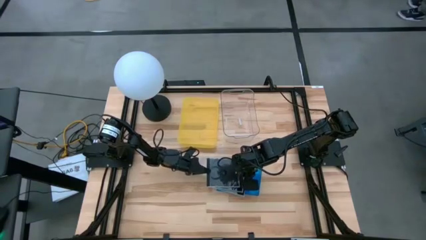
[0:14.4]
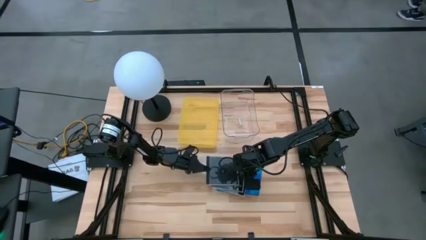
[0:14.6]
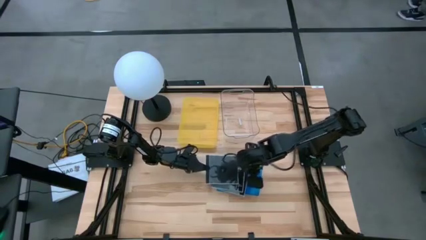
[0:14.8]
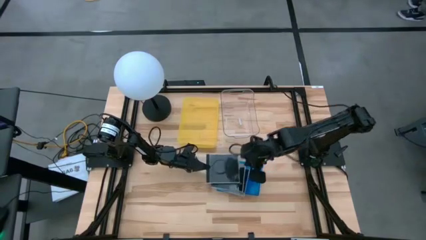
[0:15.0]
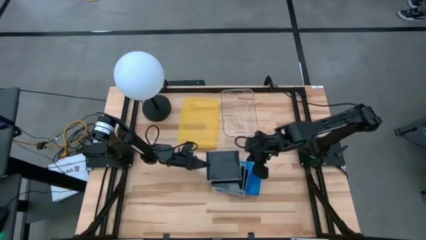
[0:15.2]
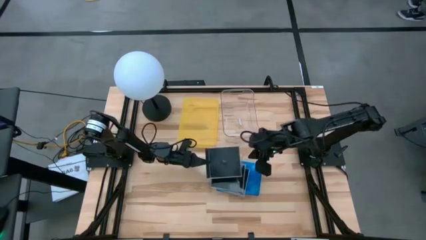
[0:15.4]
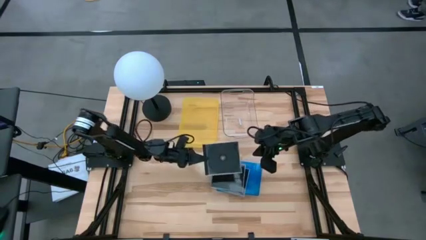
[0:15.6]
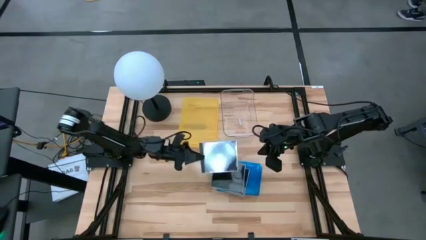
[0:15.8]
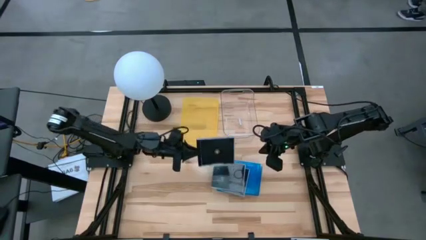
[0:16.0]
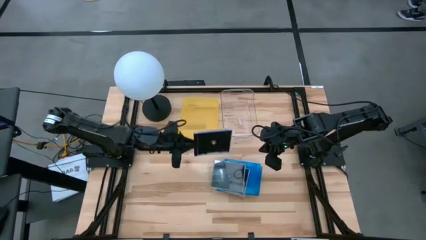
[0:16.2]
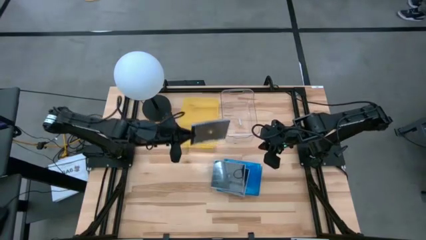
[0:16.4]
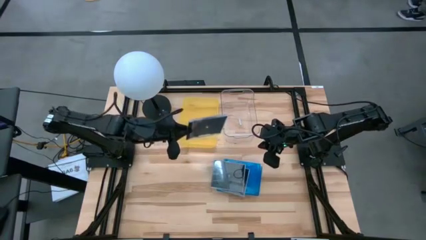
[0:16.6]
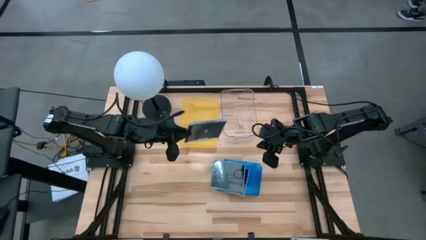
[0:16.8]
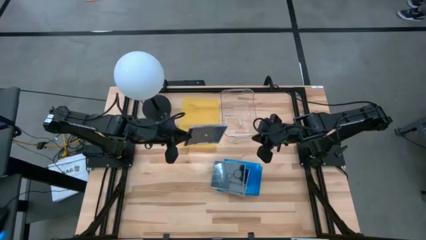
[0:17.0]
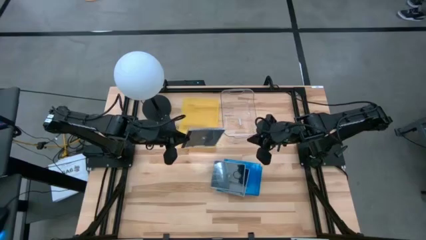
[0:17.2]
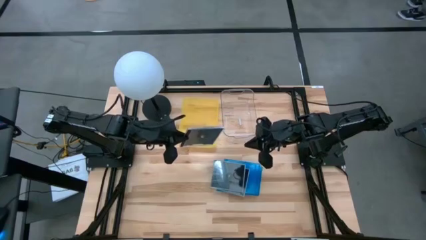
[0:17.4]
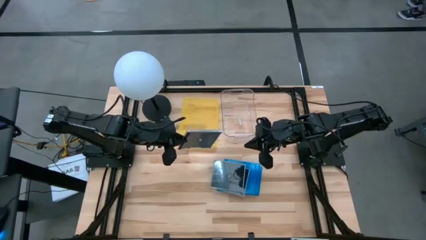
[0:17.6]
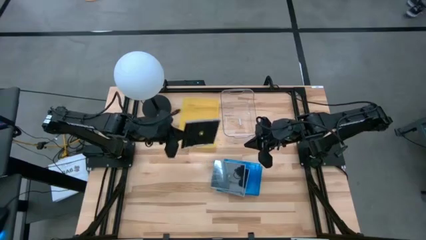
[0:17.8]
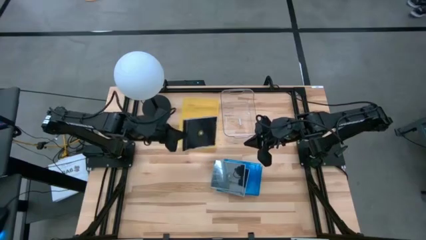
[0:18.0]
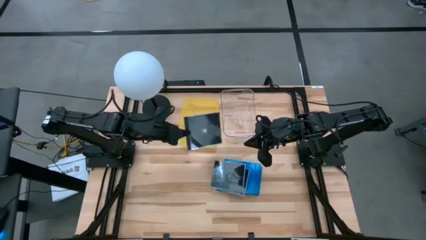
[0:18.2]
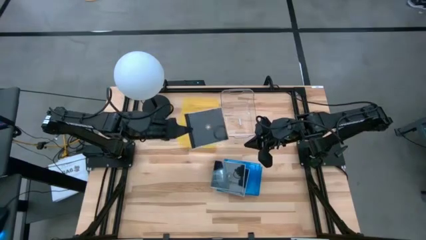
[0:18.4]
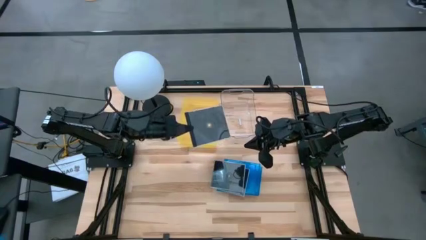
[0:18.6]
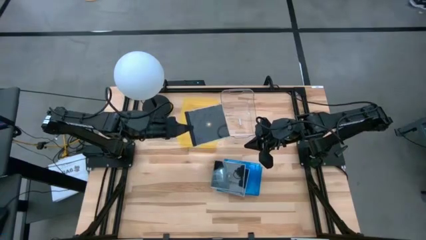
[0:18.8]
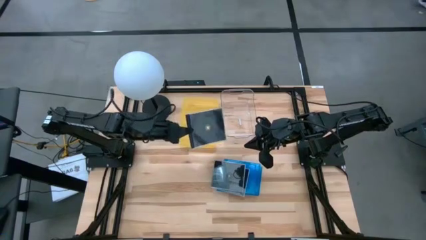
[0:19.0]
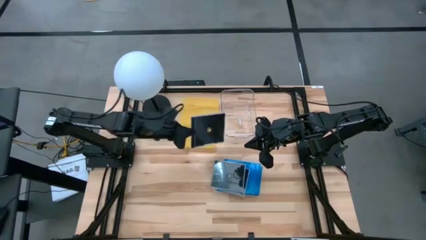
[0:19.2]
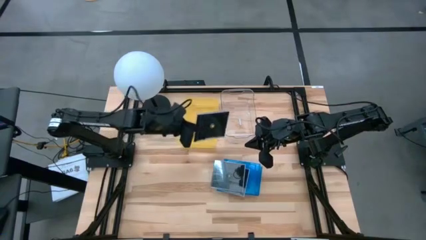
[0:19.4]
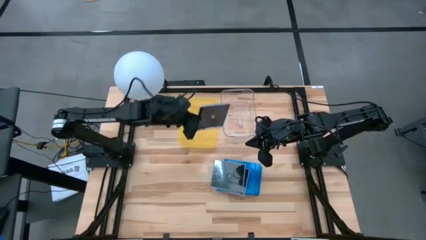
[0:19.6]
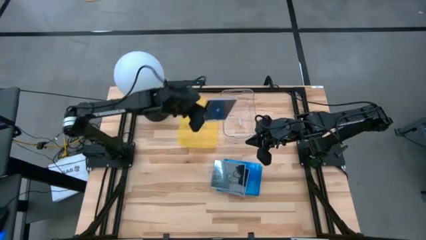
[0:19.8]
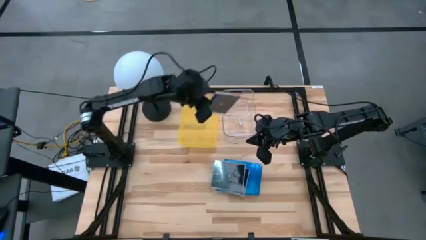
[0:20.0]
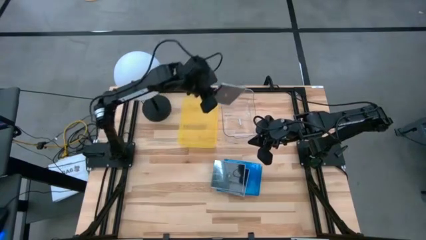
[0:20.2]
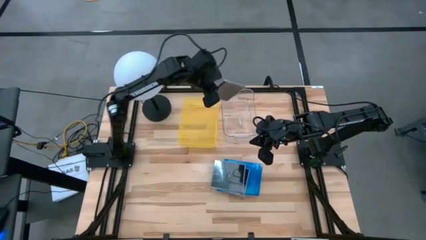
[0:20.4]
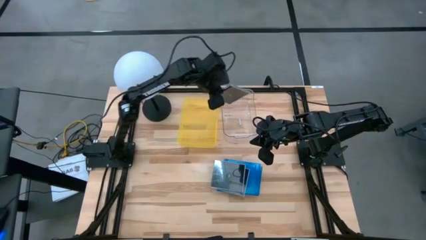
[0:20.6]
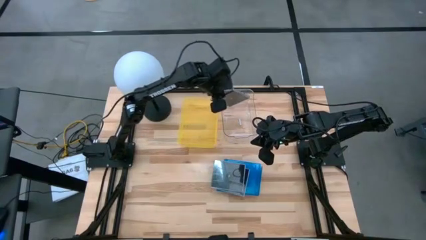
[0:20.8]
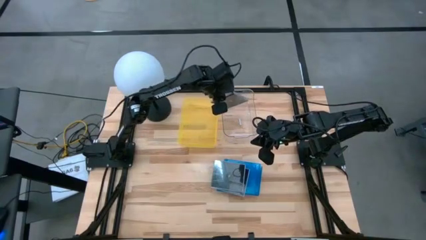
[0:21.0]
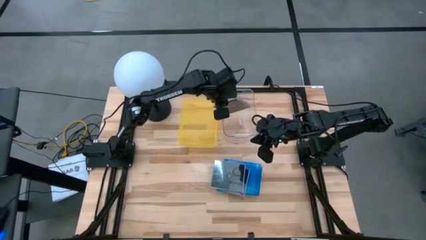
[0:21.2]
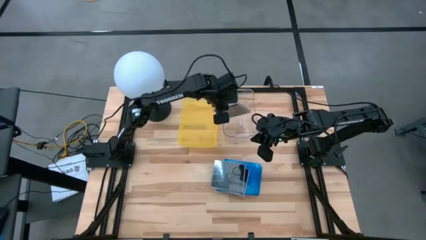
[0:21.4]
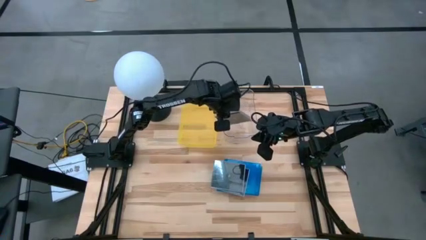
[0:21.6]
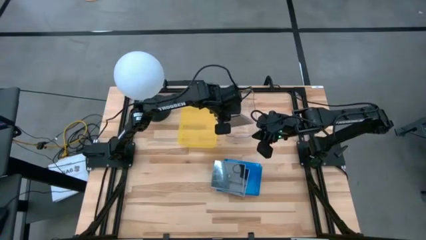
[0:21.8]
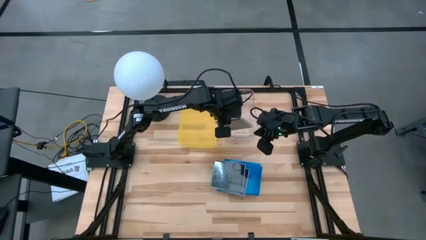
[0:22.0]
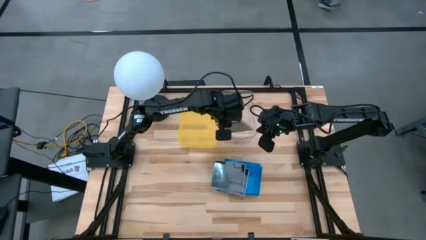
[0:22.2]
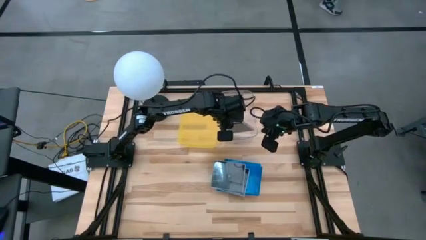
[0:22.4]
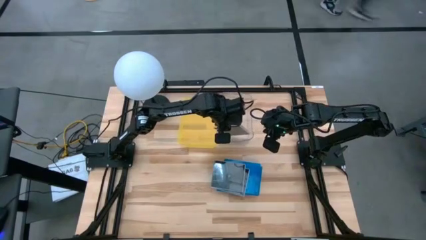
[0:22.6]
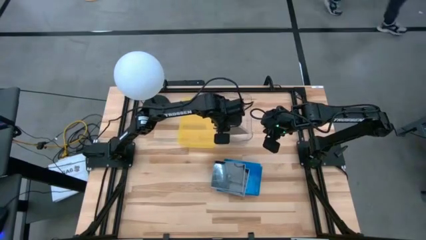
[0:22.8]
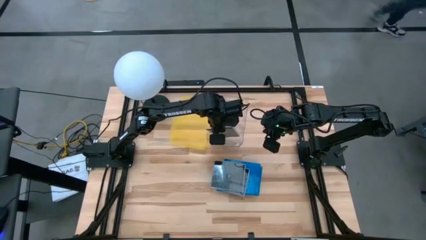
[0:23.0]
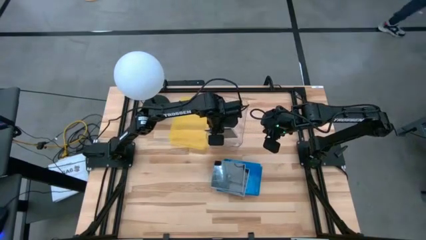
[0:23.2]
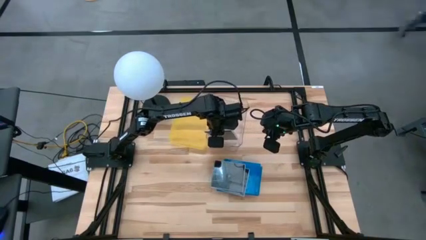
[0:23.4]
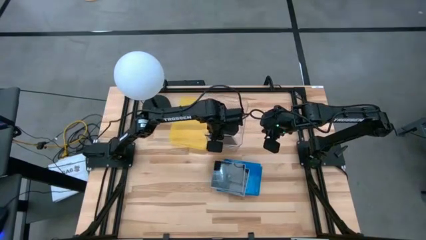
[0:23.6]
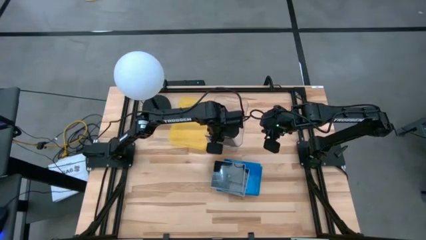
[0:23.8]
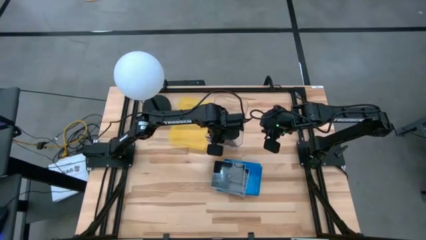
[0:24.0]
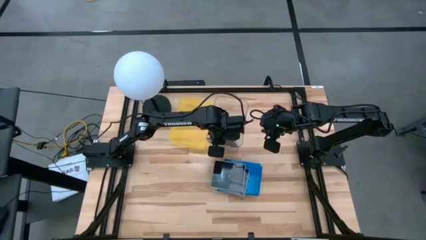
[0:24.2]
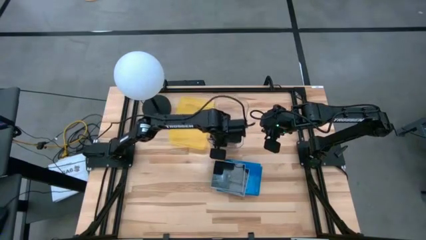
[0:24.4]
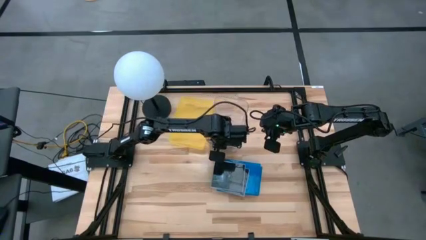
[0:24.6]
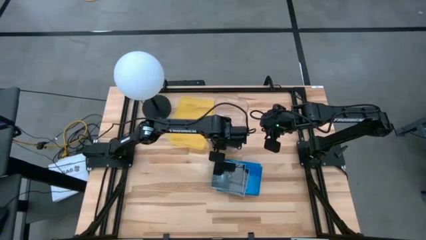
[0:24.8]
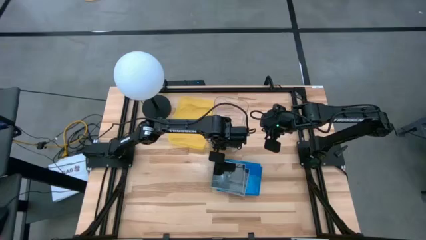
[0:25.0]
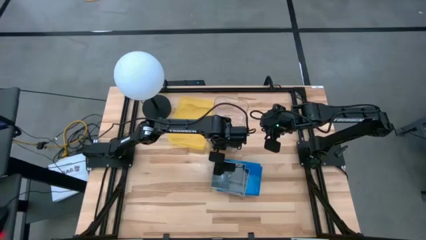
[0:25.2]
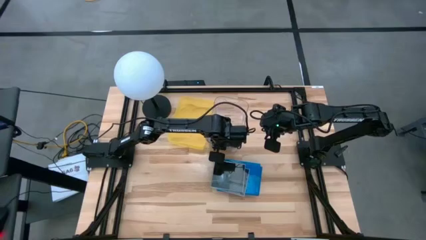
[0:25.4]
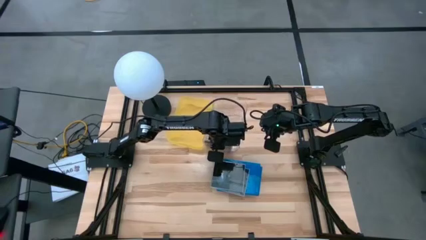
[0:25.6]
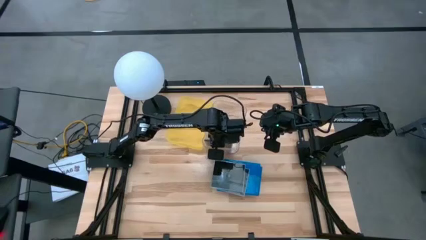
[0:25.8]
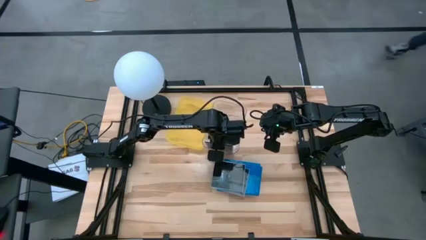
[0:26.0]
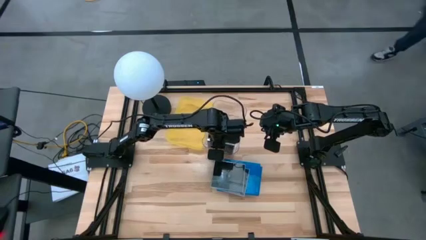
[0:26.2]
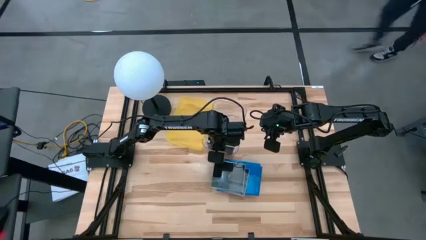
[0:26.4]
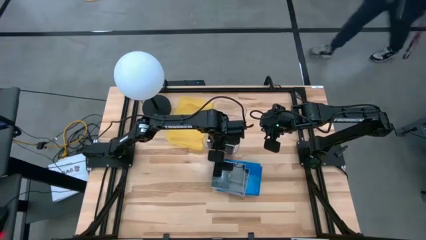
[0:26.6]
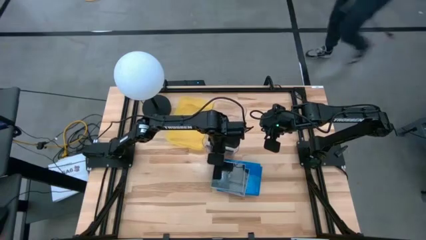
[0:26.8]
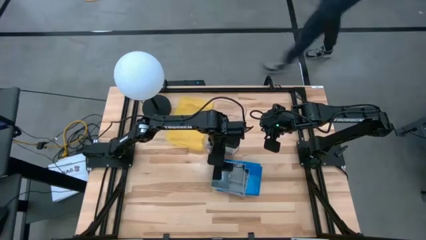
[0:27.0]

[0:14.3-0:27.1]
Task: Pick & place jewel cases by type
Put the black CD case into the transparent bin

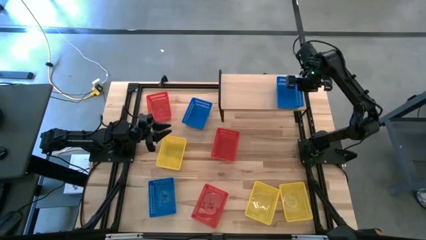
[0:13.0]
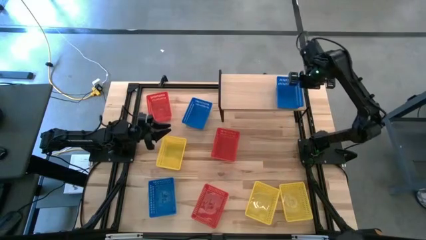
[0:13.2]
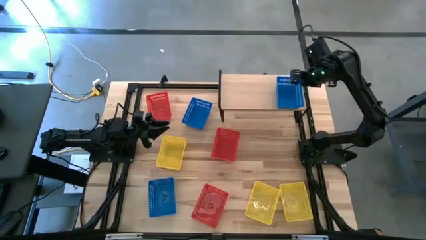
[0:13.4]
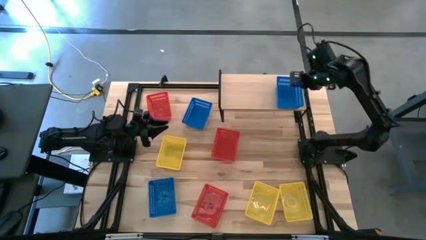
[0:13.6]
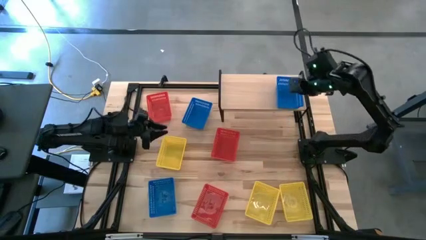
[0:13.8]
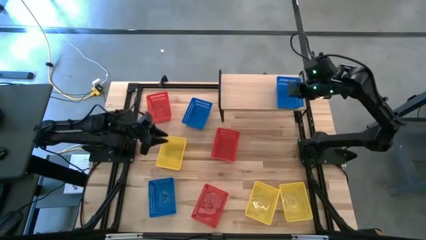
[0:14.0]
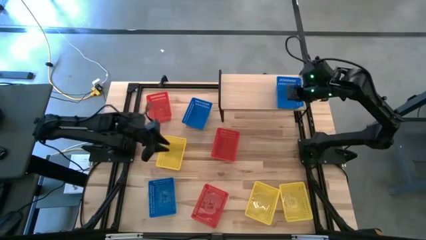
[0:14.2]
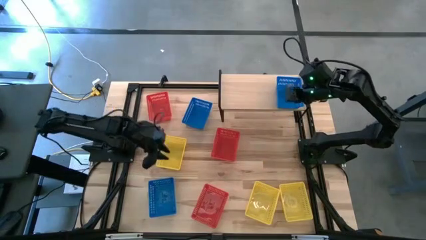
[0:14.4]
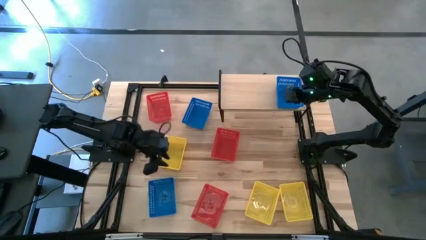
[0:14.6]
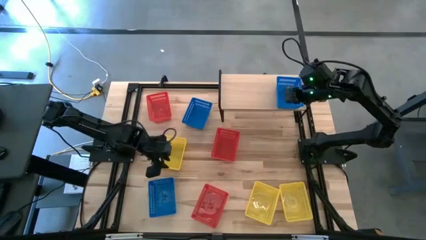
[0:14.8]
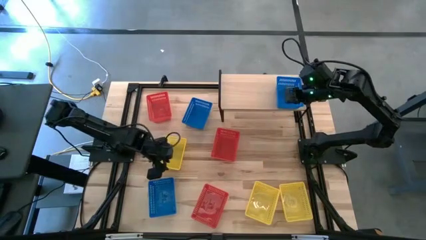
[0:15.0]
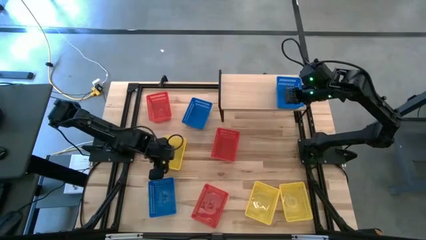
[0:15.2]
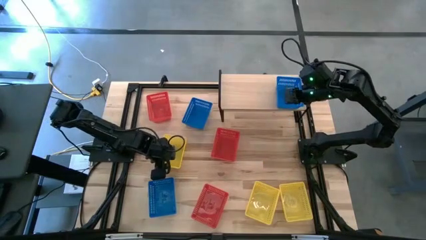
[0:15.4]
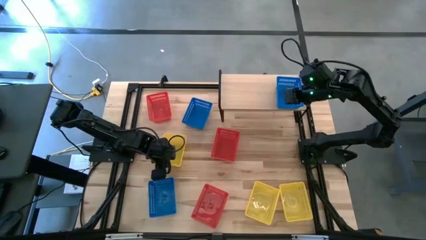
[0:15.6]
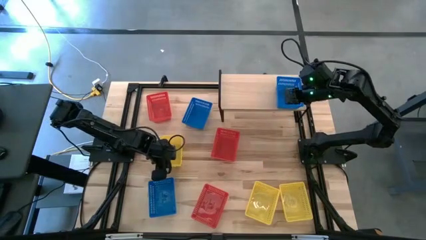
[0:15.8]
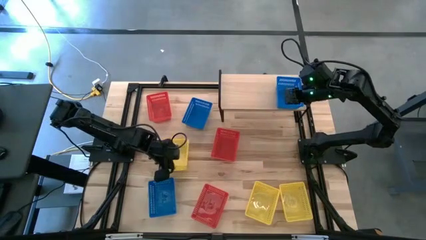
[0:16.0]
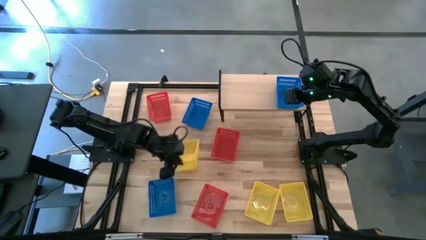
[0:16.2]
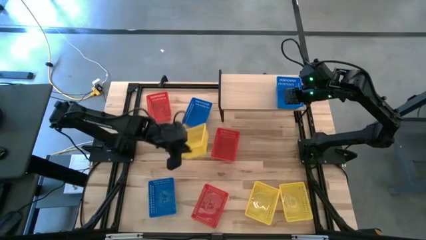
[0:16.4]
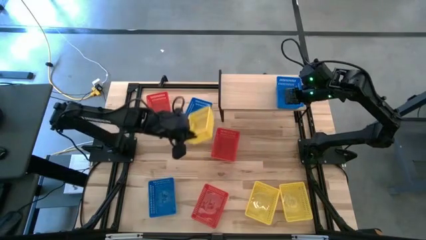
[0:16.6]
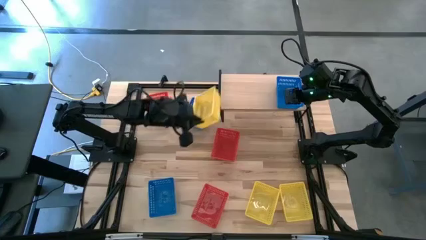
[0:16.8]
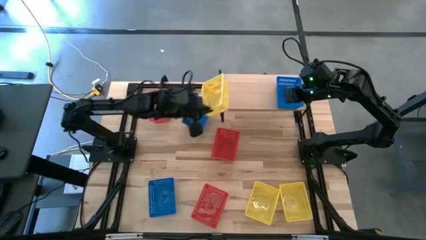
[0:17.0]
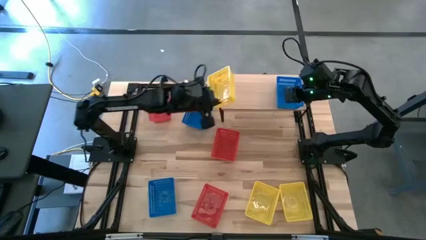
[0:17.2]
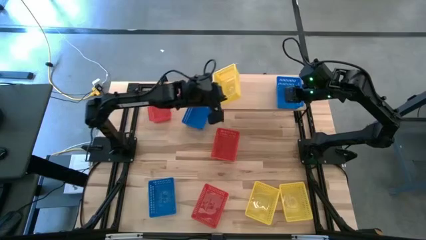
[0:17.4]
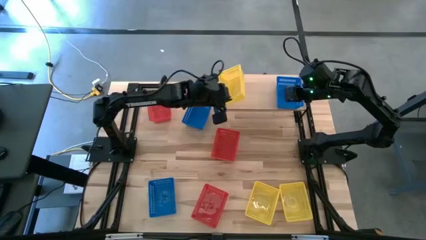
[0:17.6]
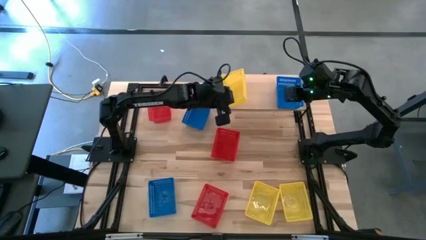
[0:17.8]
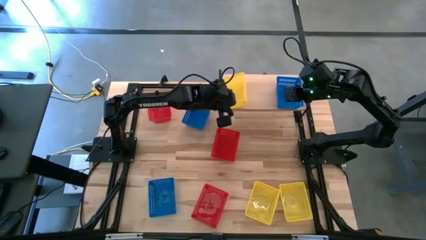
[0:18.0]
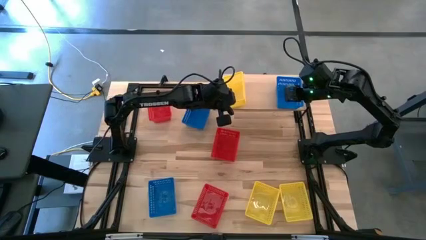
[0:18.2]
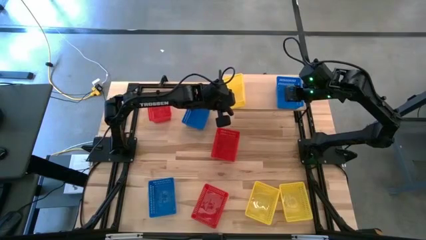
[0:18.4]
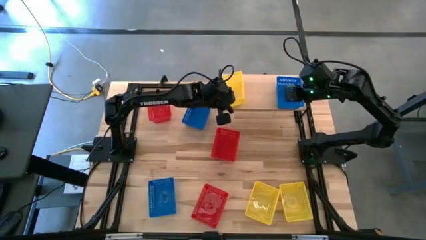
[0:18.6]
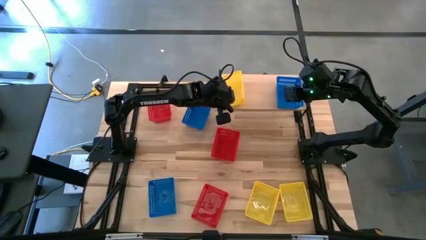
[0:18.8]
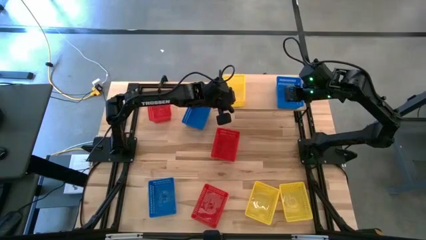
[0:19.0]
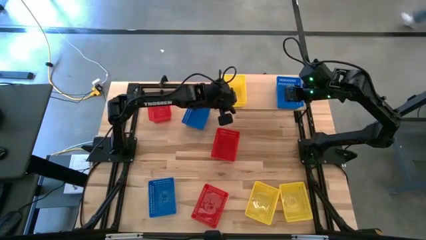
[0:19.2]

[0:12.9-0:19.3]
Task: Stack baskets on shelf by color
Put the top yellow basket on the shelf
